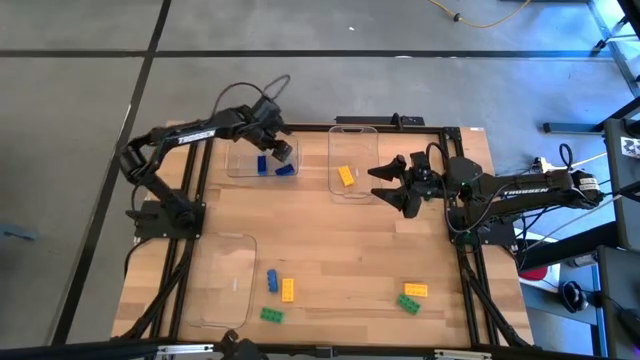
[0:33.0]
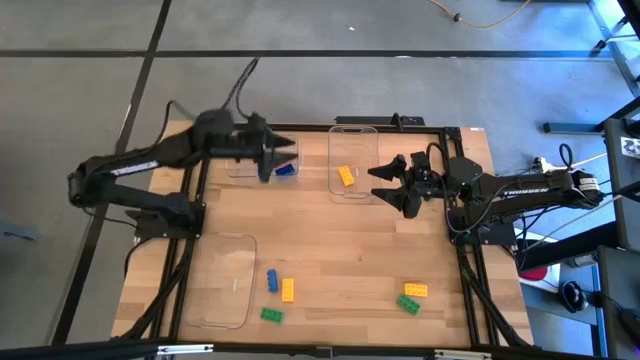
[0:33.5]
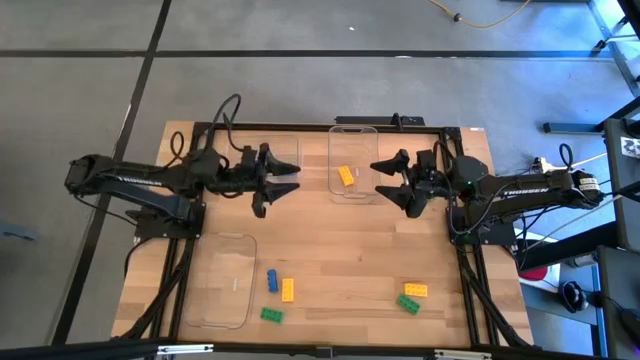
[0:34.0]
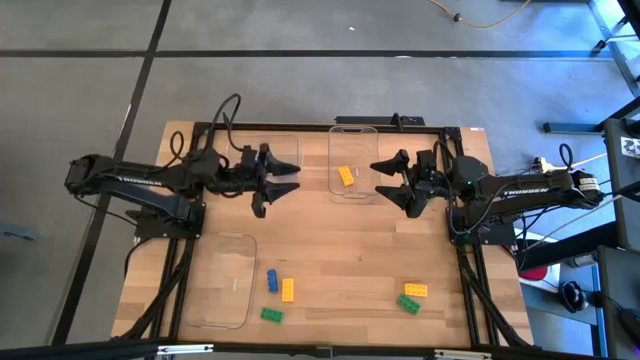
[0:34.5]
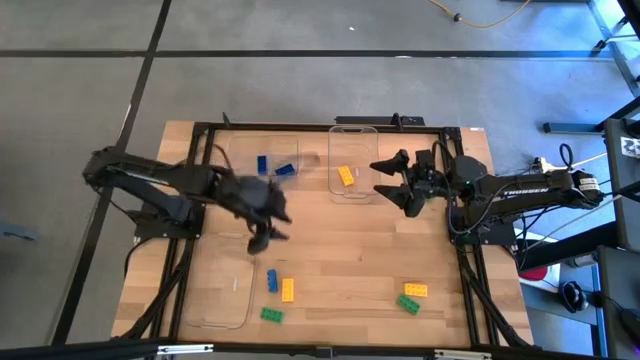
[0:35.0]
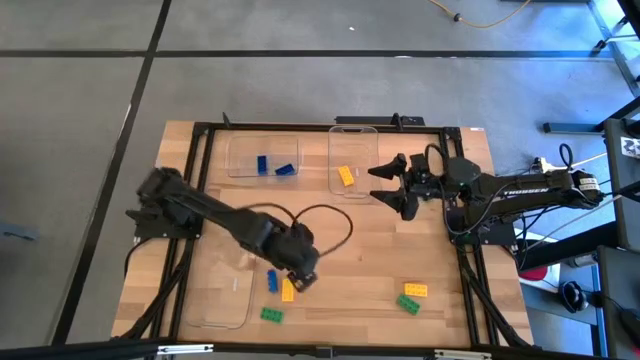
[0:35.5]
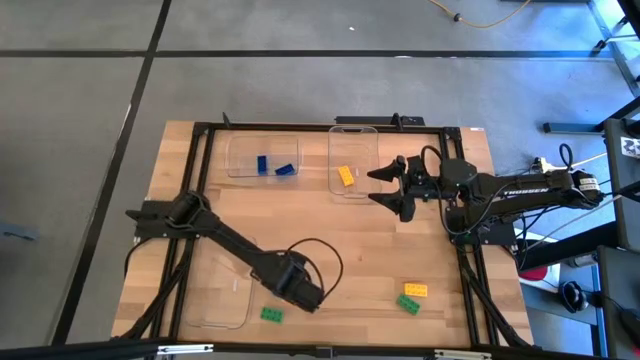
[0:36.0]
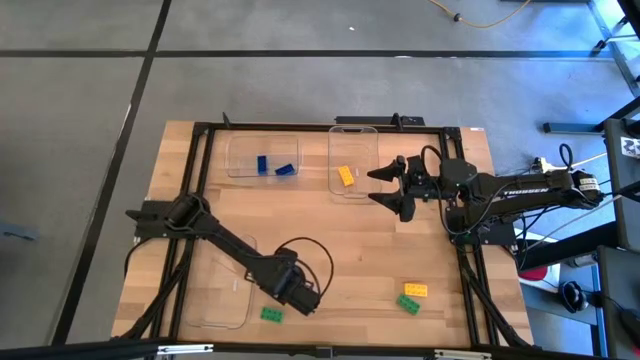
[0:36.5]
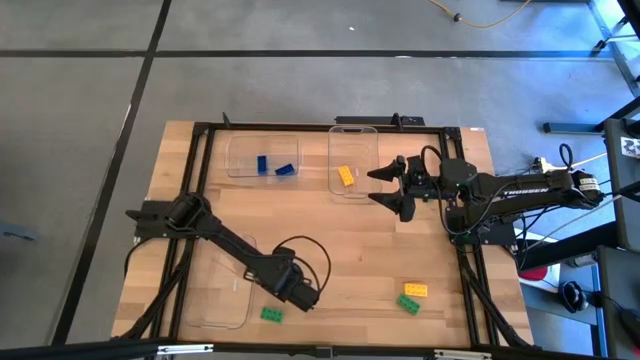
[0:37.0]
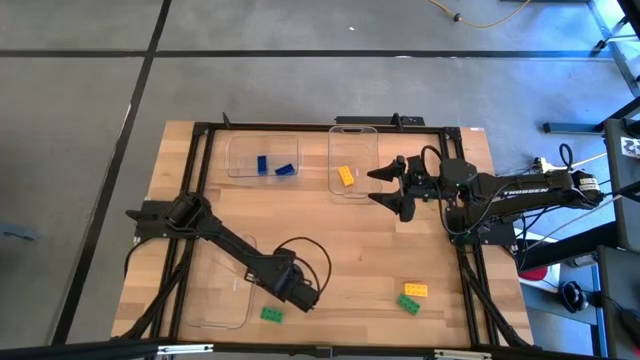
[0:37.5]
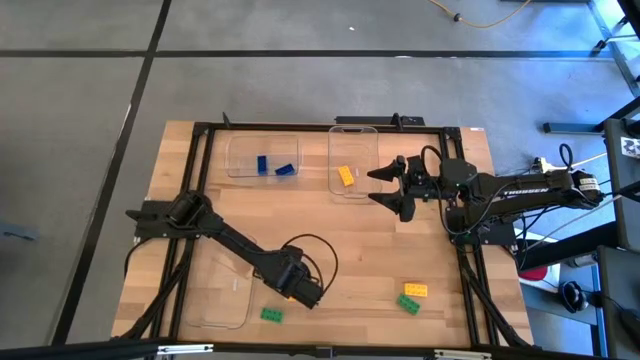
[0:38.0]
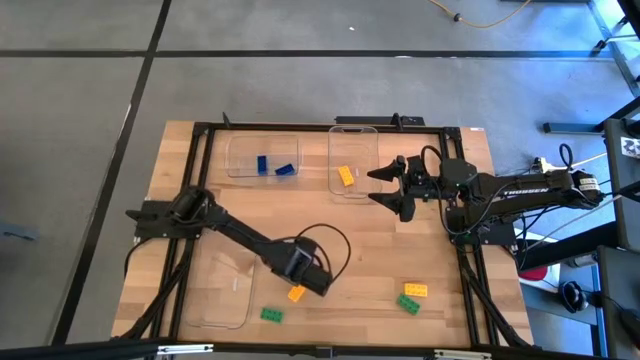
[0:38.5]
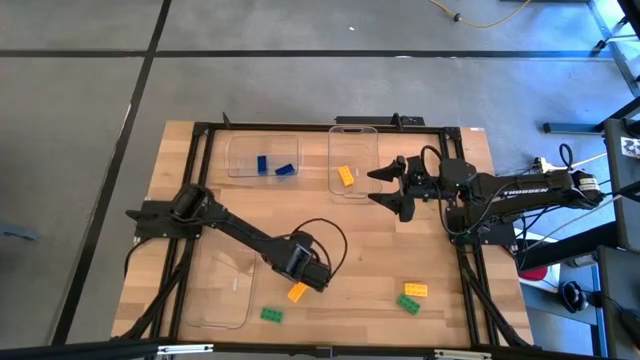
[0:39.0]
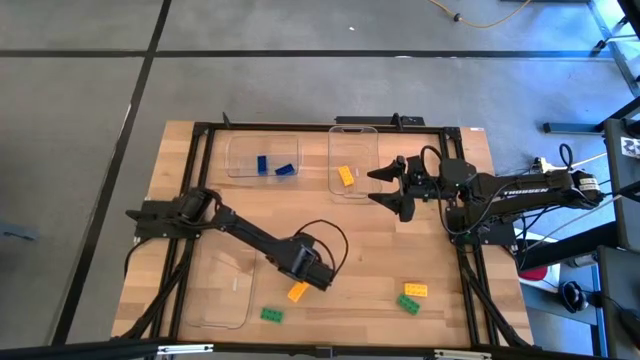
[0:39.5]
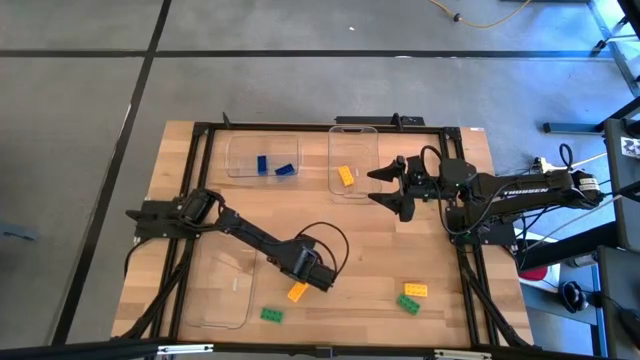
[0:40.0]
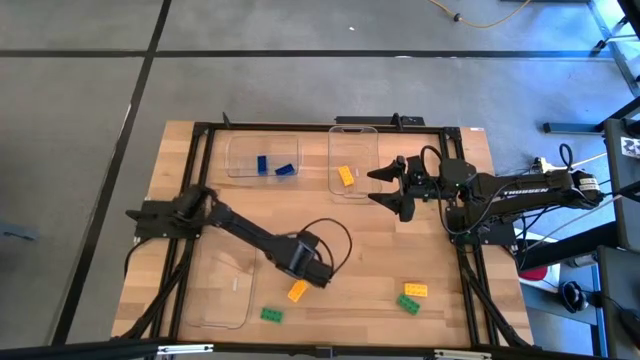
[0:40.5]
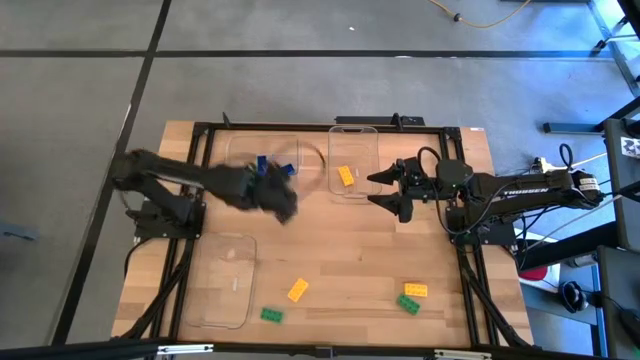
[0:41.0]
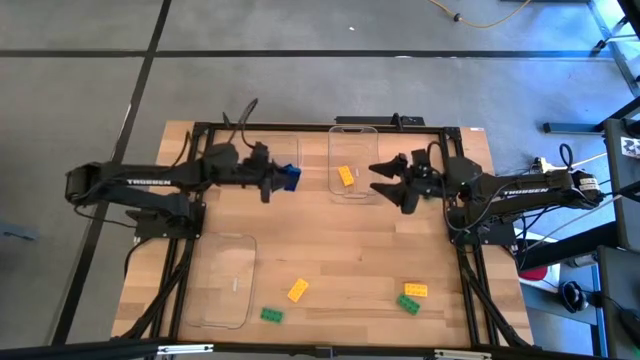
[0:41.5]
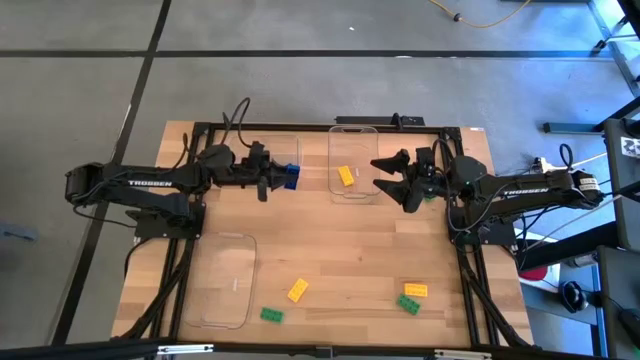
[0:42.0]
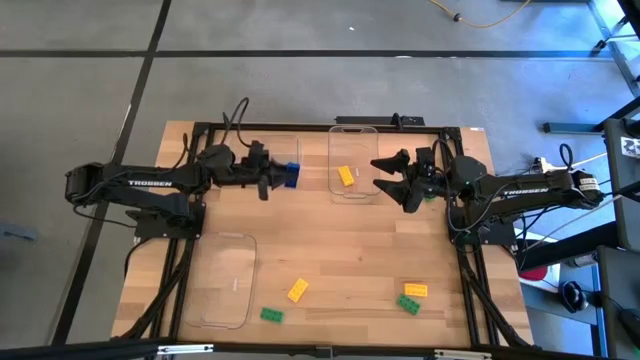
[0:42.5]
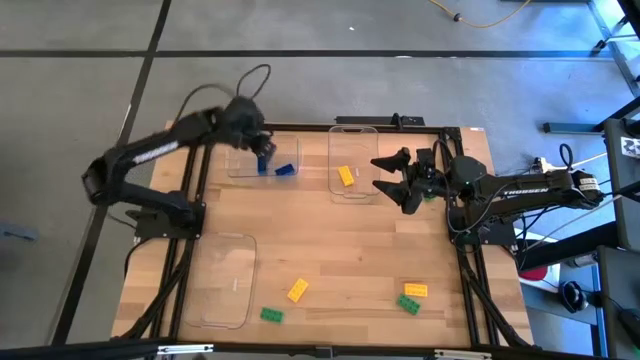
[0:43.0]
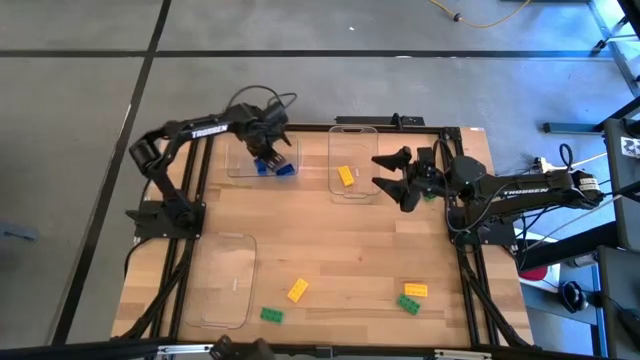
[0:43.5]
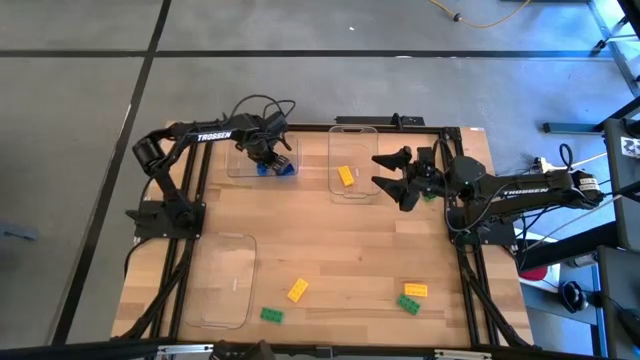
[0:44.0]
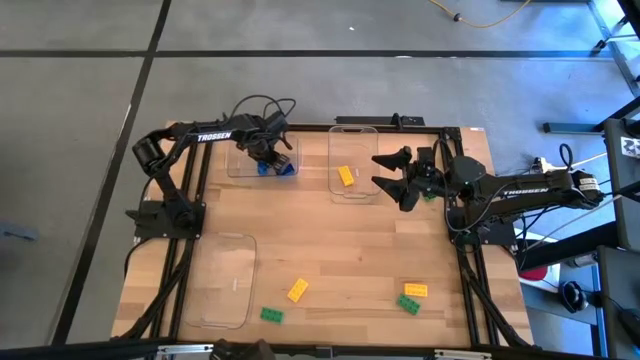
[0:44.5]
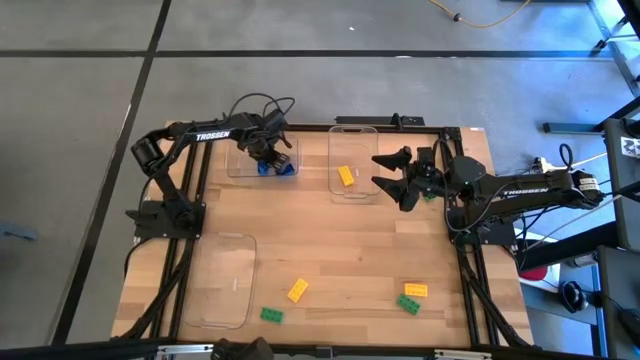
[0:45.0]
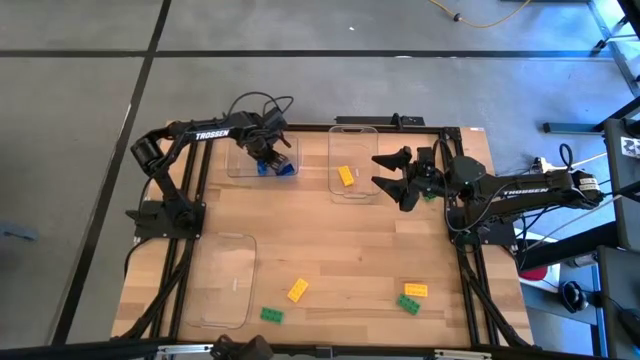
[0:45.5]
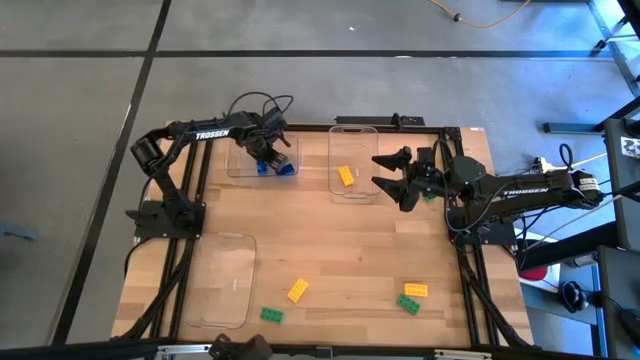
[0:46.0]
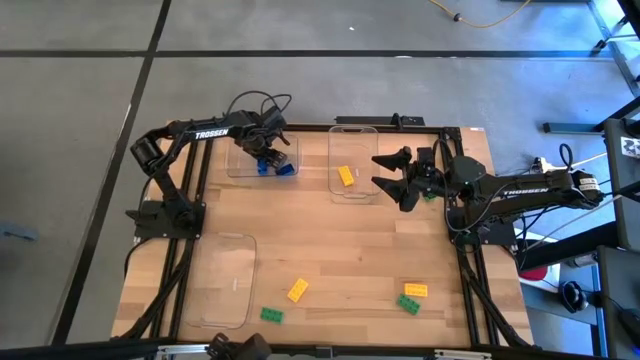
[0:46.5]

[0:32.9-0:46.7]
Task: Sort & place blocks by color
Put the blue game piece into the top left transparent bin

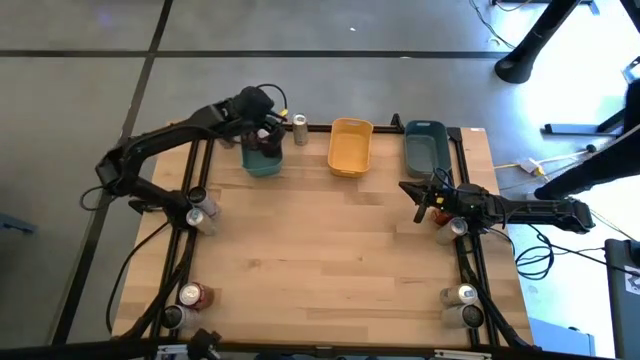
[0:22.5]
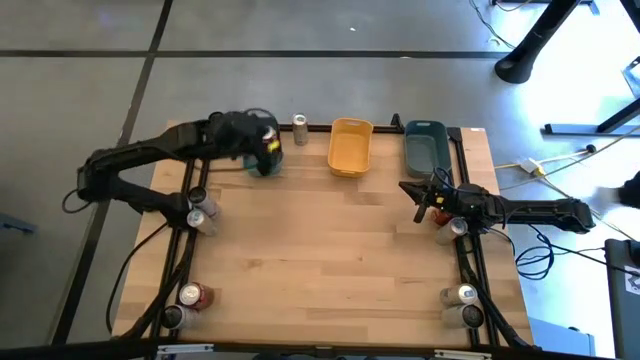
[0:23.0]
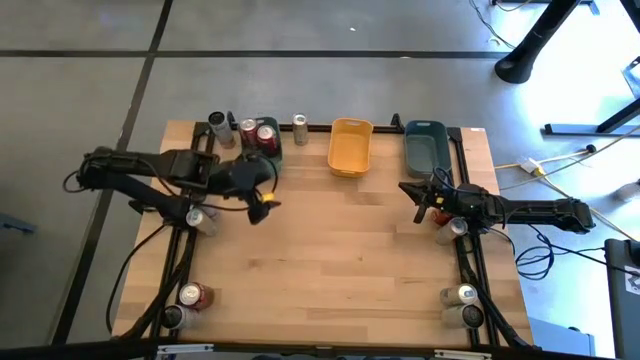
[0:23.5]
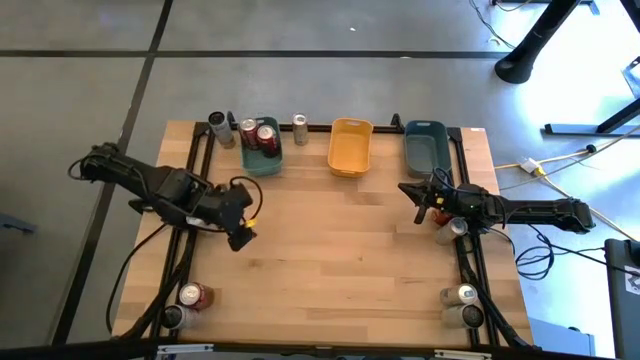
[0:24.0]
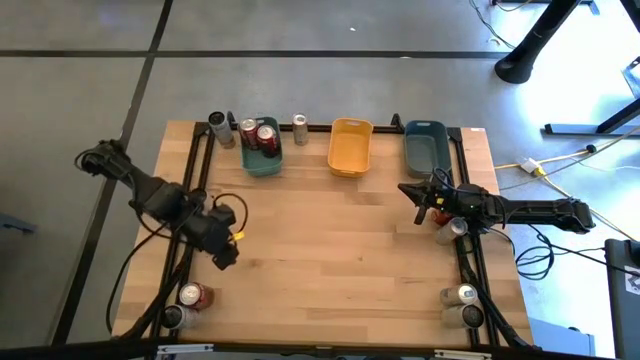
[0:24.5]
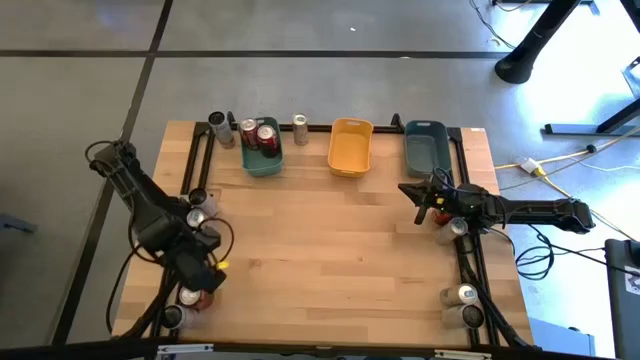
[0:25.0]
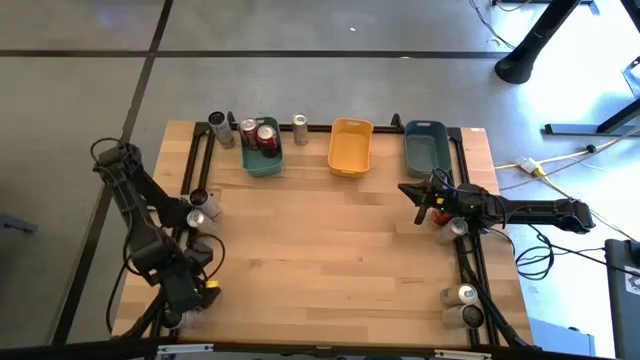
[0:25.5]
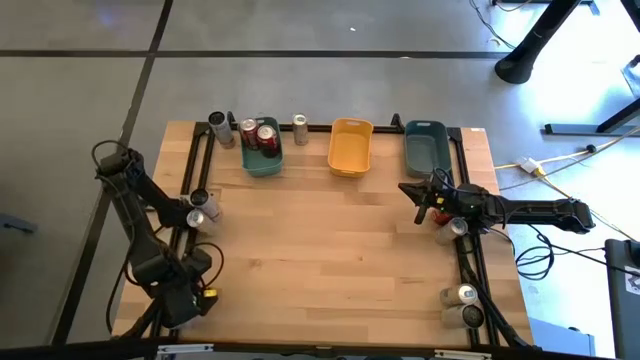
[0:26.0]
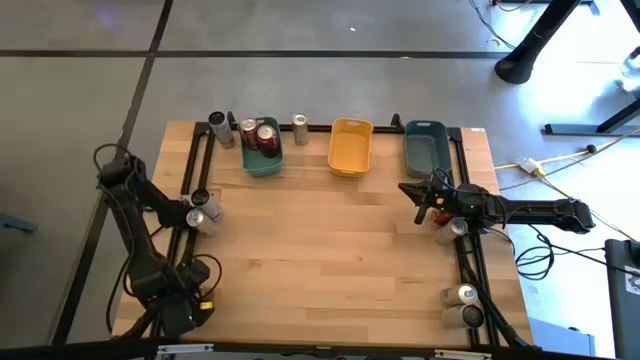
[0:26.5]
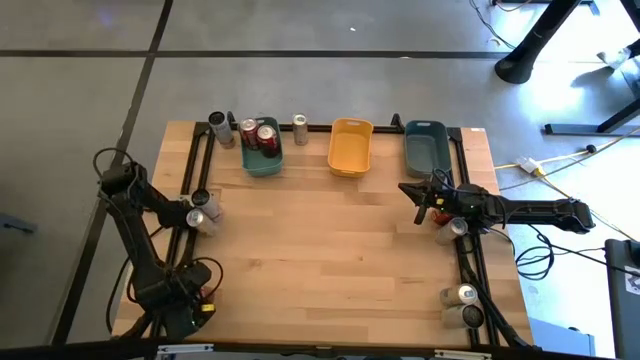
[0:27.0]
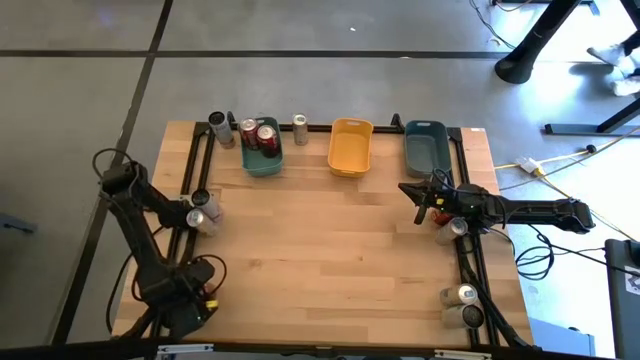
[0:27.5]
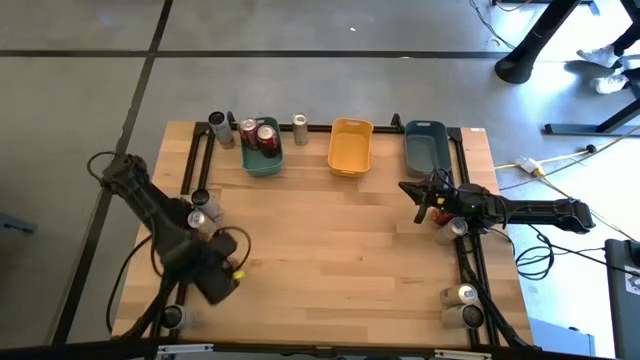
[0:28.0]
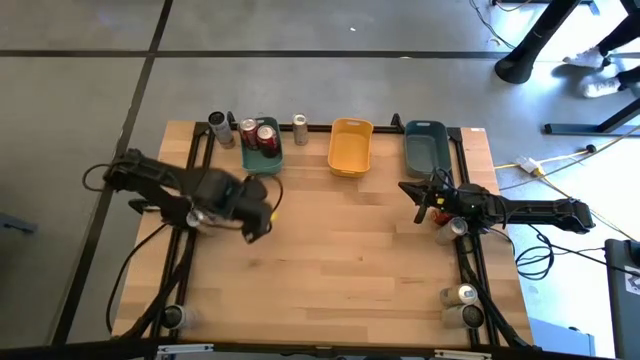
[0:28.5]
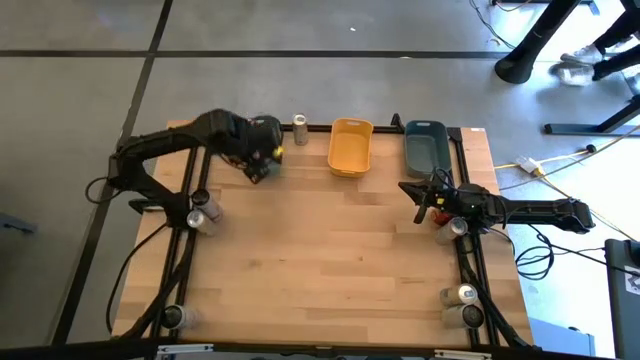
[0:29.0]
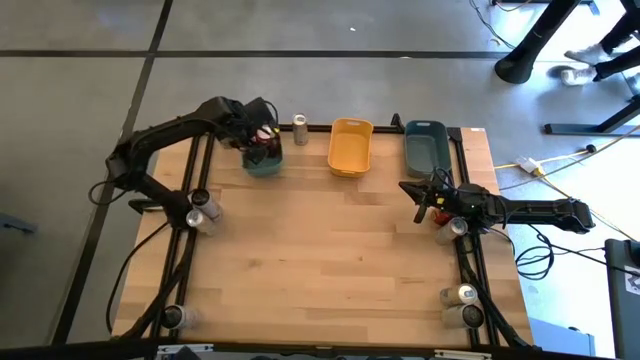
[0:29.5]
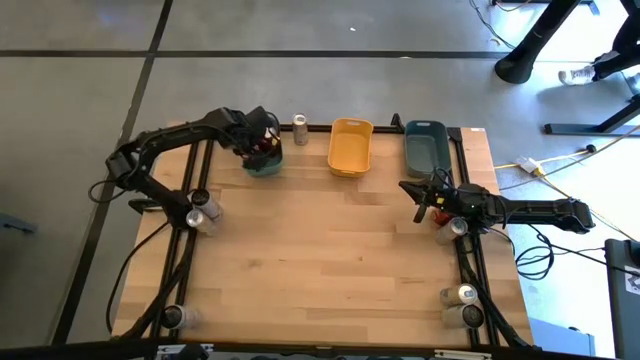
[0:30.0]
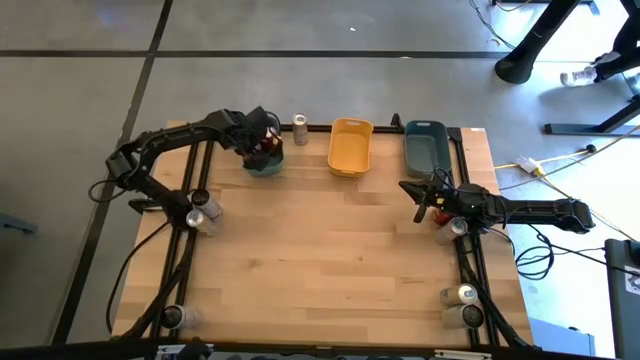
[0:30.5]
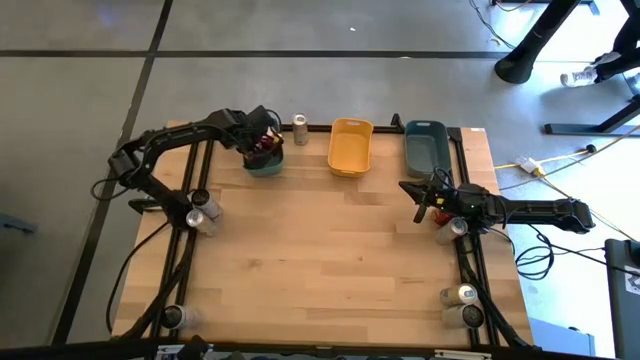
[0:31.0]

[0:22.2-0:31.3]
Task: Sort soda cans
Put the left red soda can into the green bin
